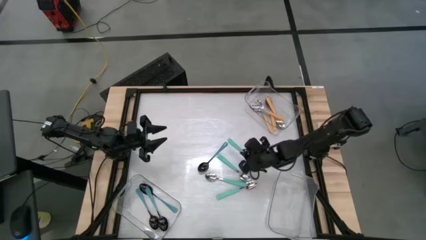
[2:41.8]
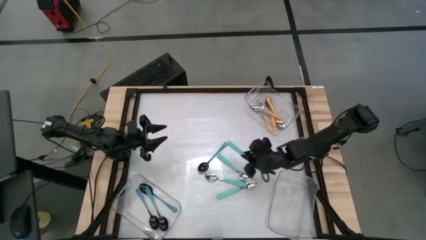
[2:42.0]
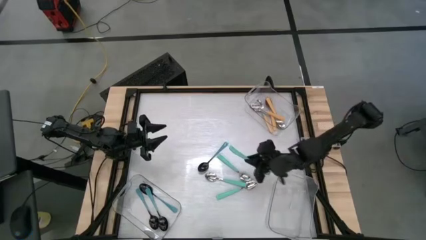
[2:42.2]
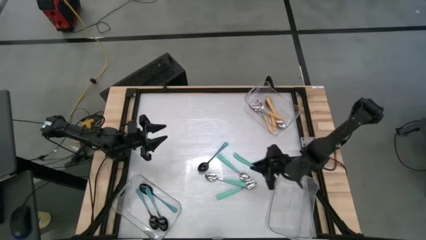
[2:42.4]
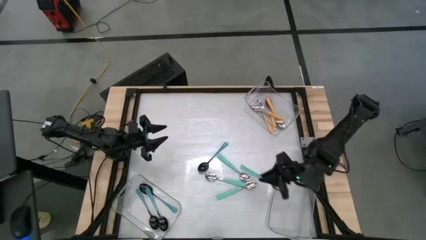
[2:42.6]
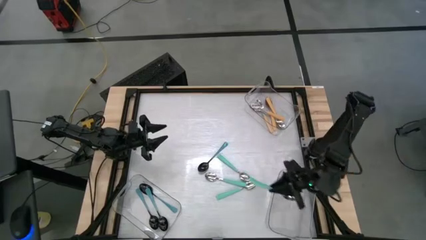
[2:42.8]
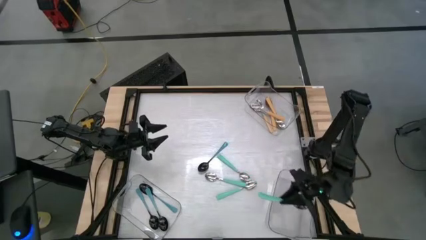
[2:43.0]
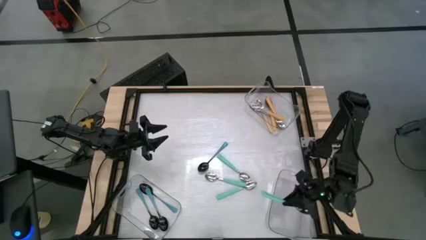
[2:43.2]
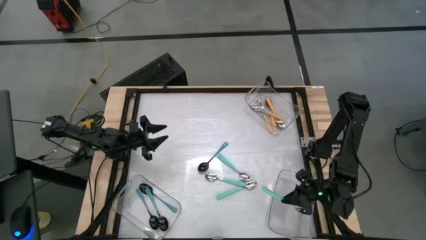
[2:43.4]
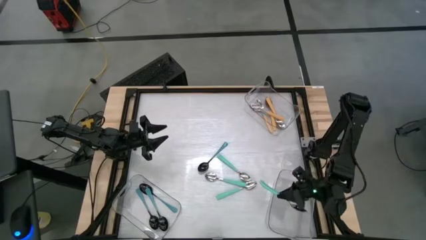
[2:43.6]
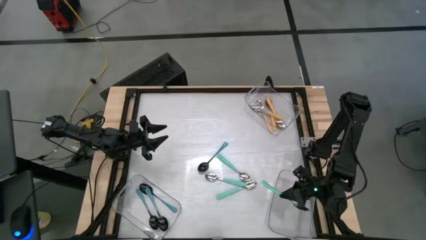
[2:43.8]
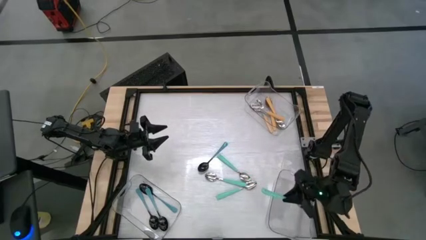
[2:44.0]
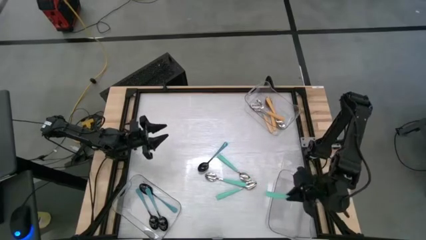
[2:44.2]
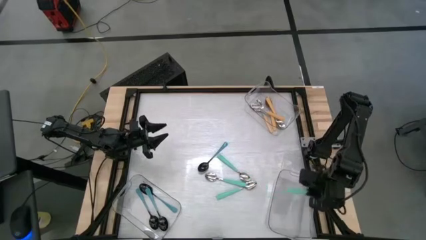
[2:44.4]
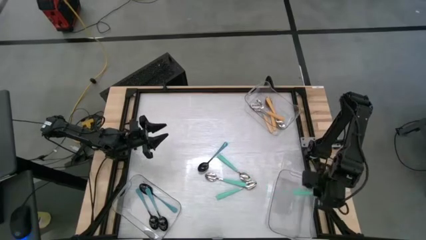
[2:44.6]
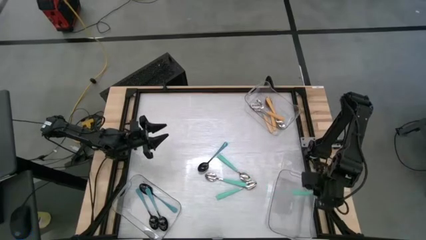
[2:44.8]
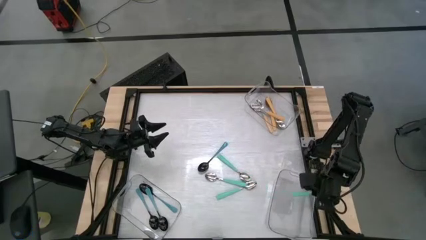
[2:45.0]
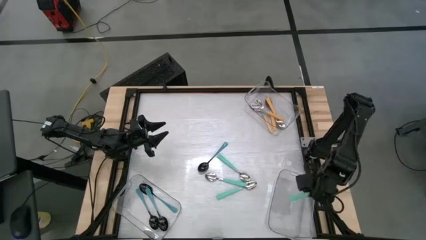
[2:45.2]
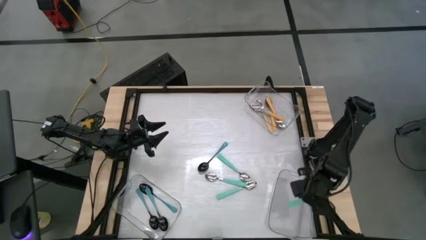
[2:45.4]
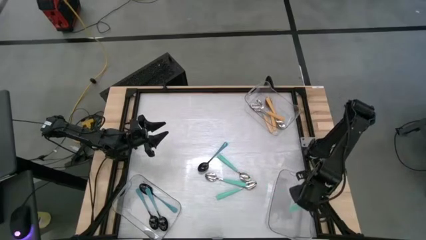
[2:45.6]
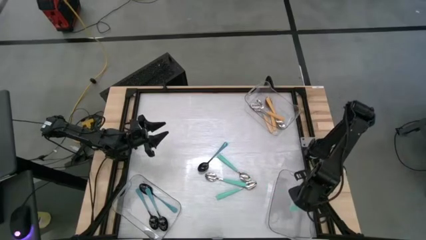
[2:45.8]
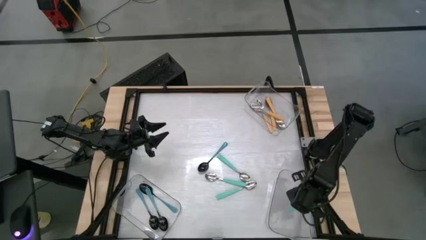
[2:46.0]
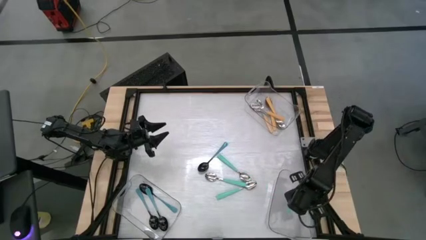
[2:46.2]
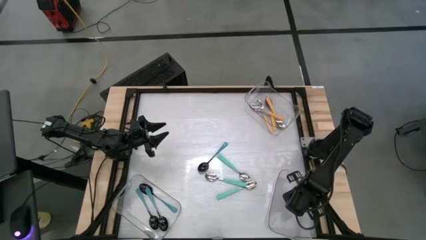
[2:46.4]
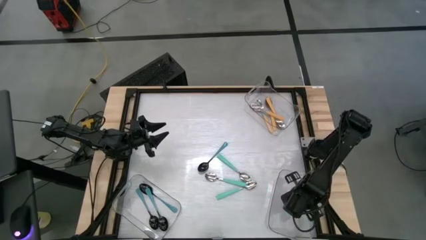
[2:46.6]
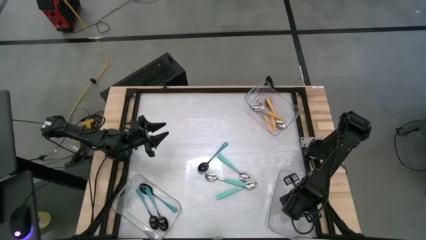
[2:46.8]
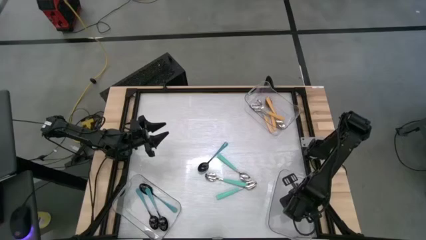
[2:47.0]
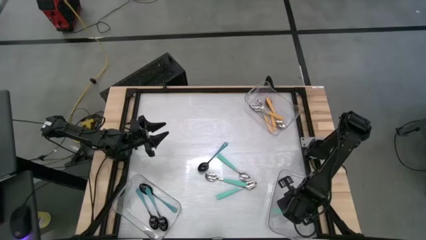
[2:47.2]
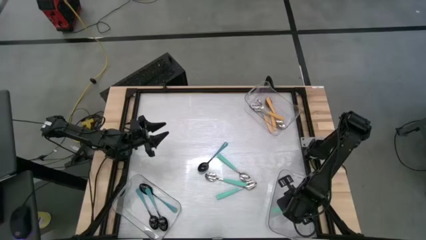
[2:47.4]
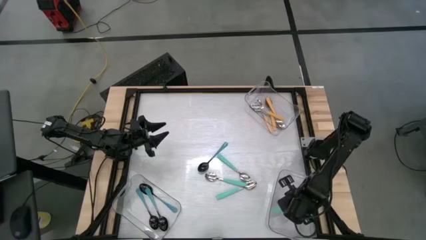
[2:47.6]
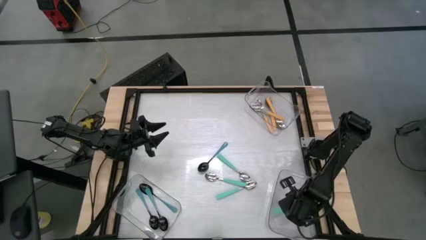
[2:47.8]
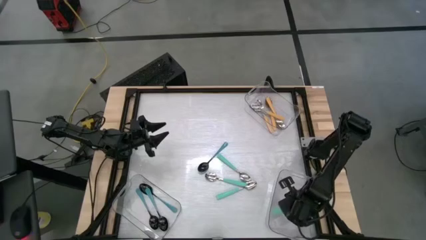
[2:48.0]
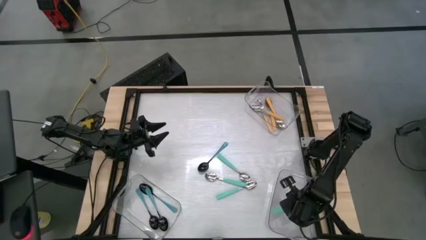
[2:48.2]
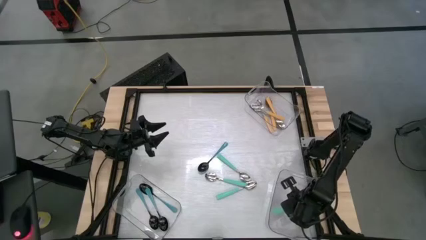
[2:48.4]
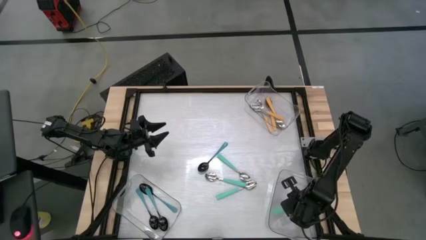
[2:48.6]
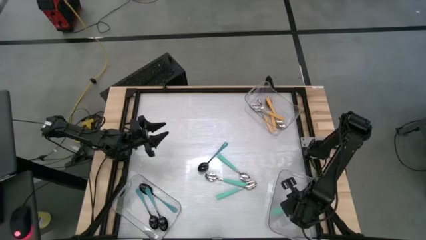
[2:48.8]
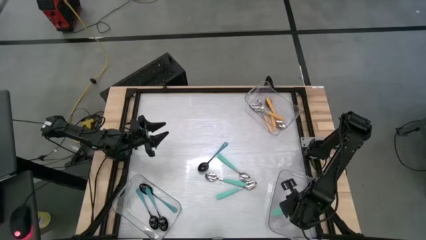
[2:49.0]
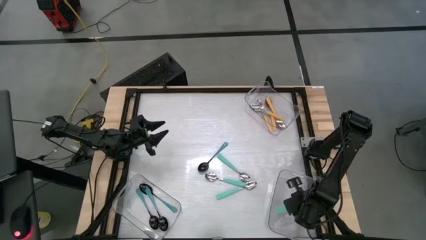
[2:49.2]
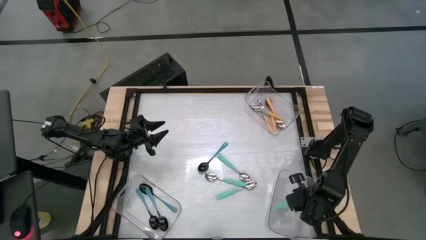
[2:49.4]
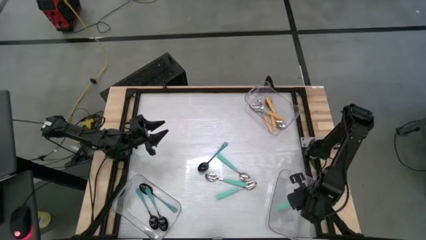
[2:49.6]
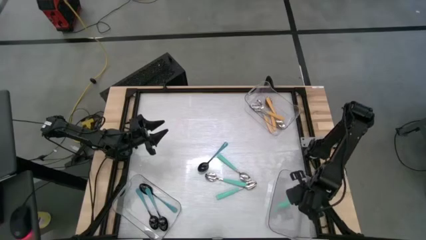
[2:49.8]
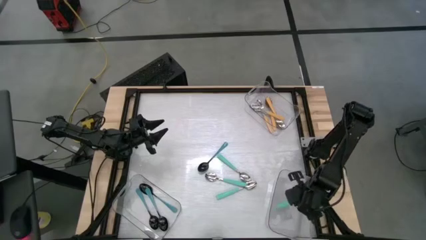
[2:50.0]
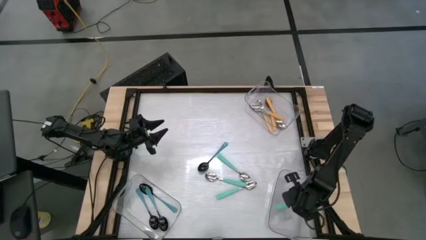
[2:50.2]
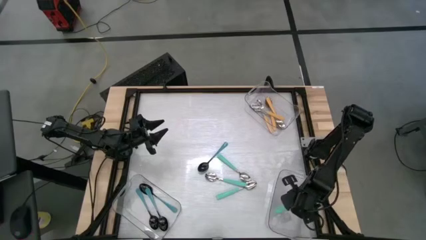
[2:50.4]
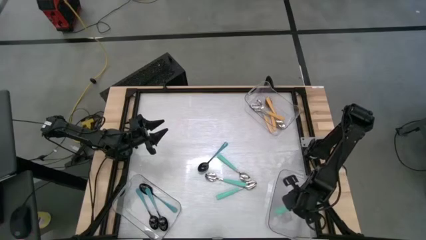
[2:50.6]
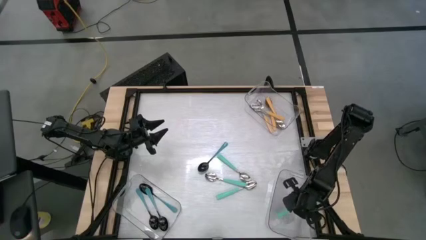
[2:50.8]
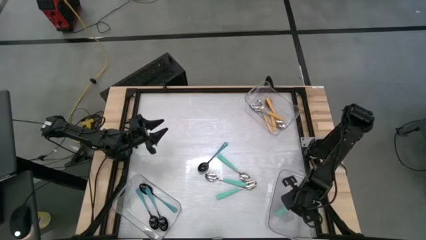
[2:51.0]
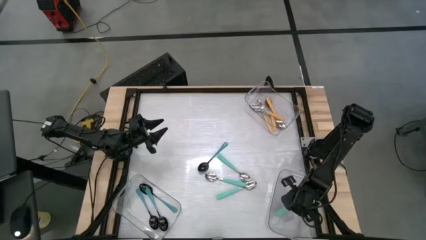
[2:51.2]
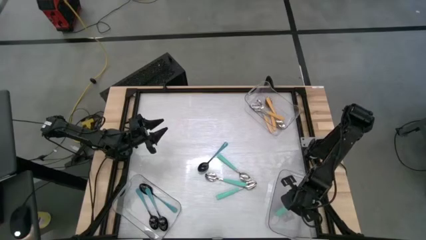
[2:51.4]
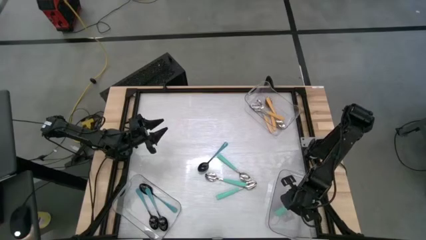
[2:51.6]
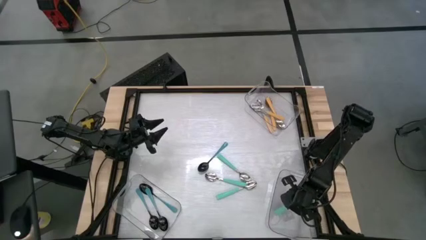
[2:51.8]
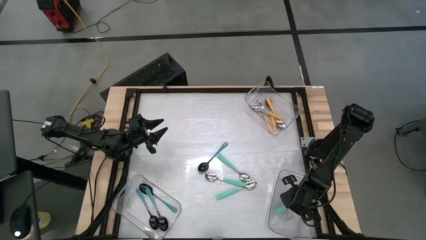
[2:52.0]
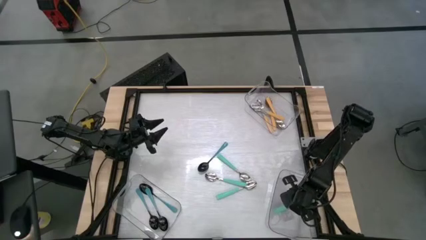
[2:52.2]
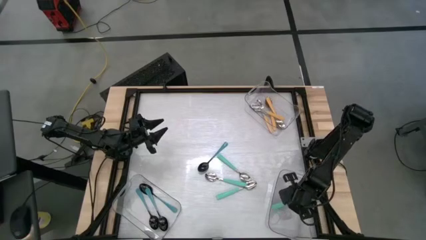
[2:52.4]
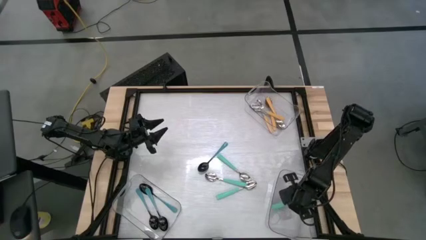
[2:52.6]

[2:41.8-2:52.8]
Task: Sort silverware by color (type)
Put the green spoon into the bottom right transparent bin

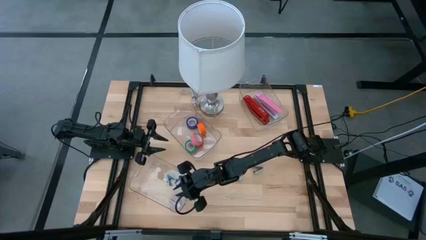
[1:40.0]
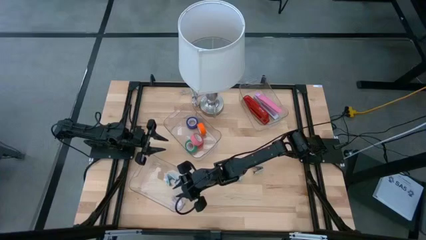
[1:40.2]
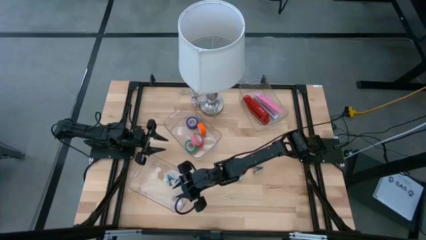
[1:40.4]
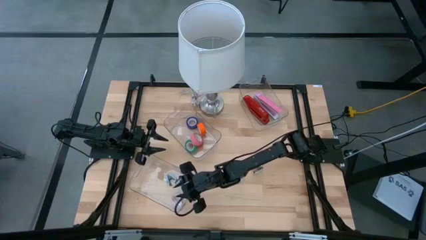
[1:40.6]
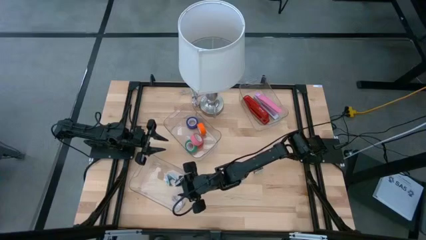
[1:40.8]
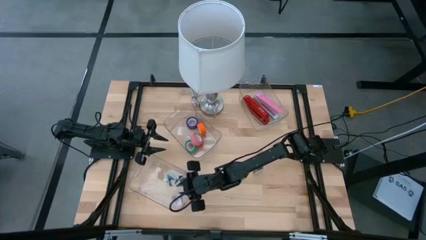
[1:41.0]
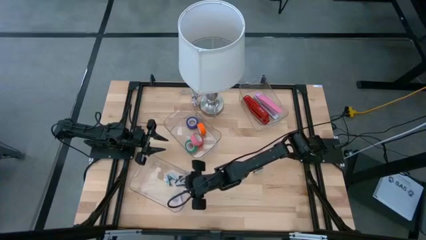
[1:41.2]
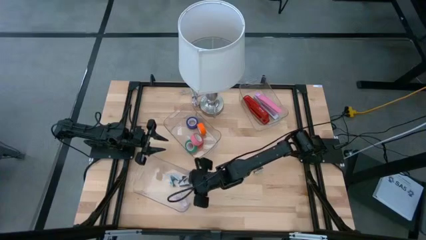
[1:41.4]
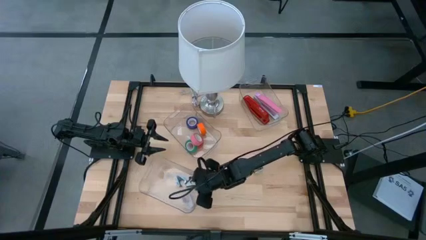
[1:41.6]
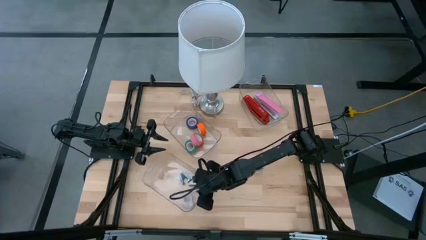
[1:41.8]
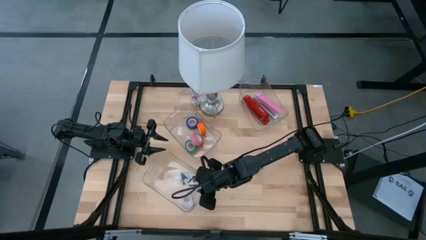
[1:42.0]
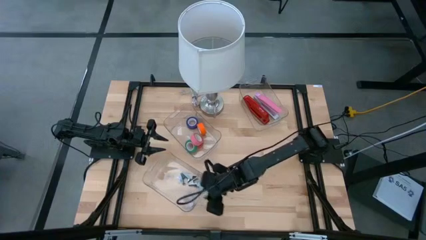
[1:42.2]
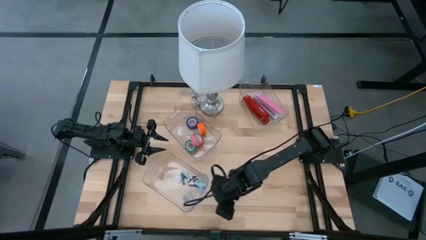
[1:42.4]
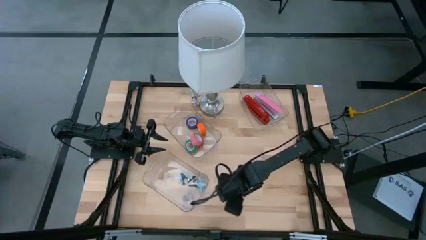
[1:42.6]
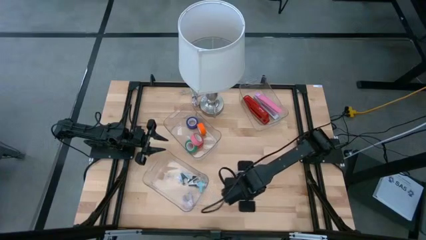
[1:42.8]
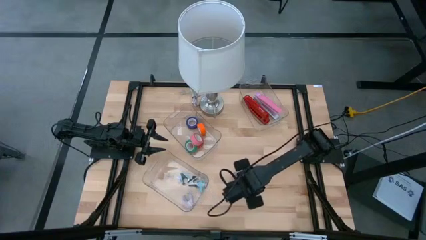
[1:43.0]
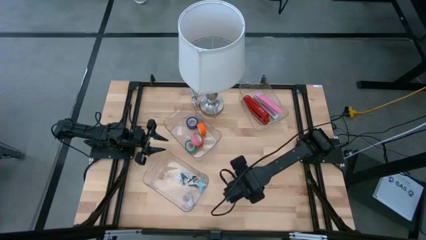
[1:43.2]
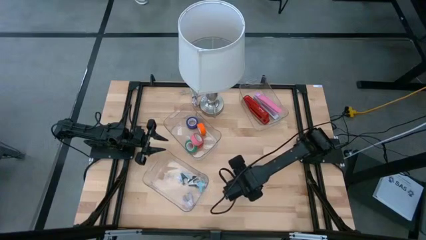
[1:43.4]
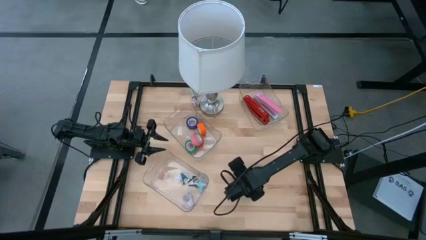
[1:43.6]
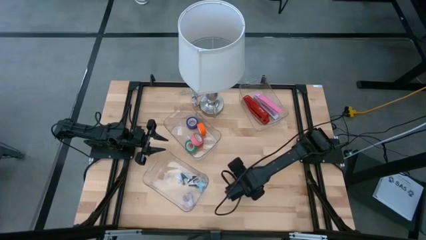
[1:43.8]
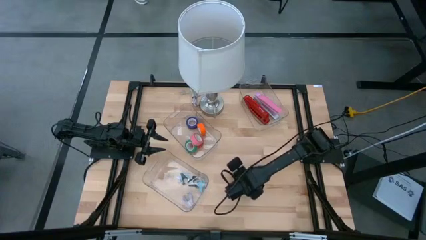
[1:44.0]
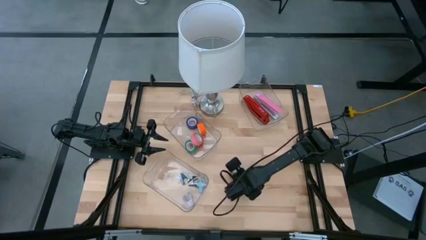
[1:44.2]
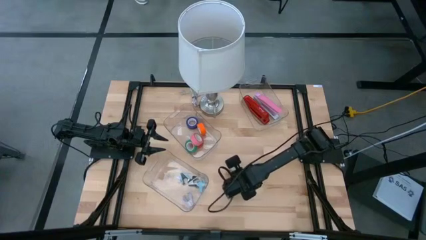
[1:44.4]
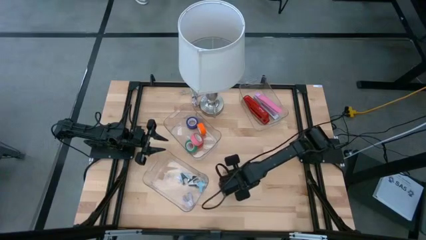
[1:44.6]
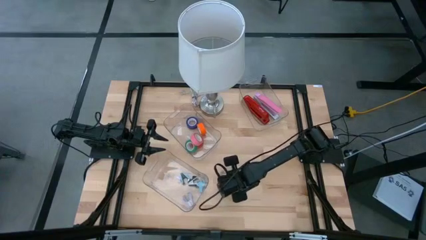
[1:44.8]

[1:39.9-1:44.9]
Task: Pick and place Stapler, Stapler remover, tape
Put the left gray staple remover into the bottom transparent bin
